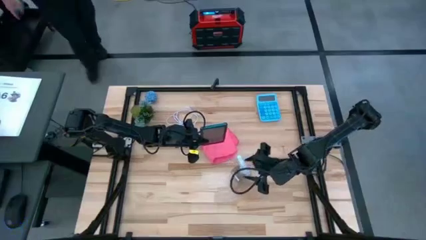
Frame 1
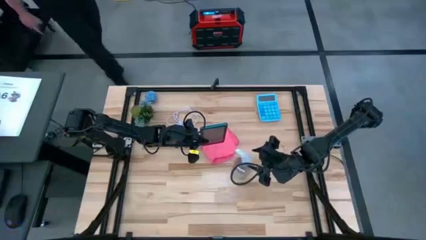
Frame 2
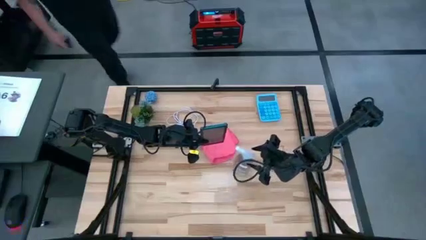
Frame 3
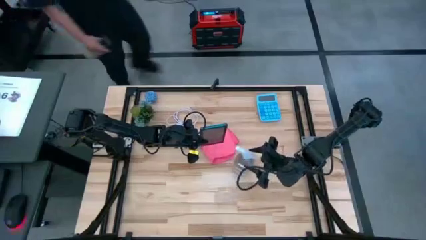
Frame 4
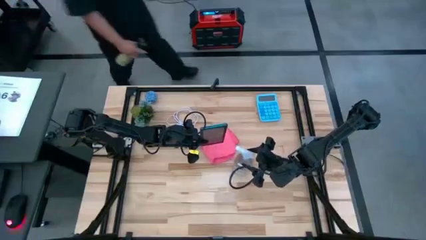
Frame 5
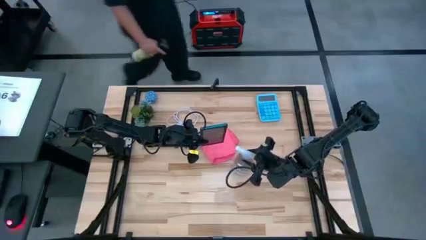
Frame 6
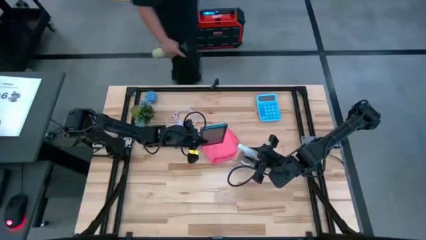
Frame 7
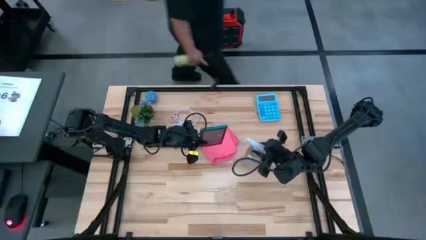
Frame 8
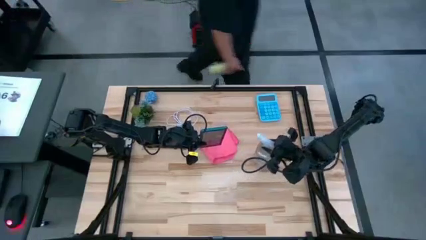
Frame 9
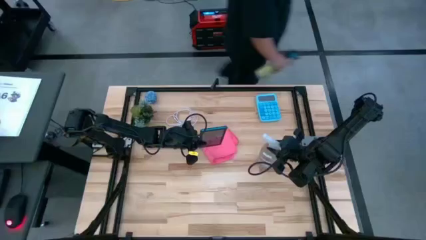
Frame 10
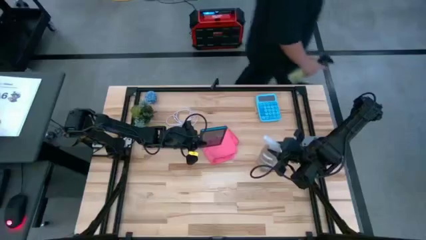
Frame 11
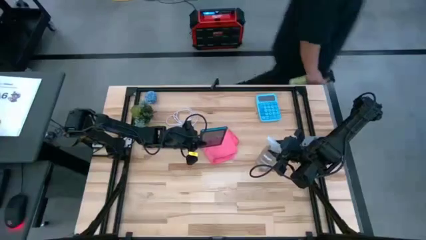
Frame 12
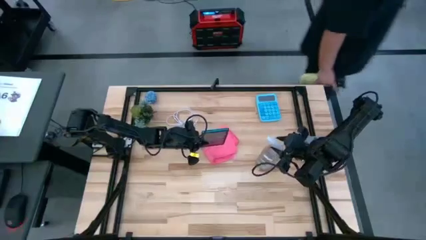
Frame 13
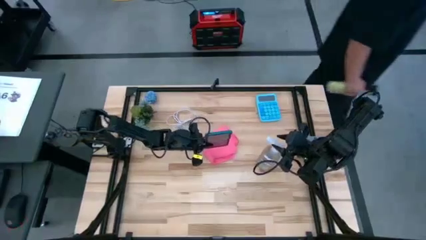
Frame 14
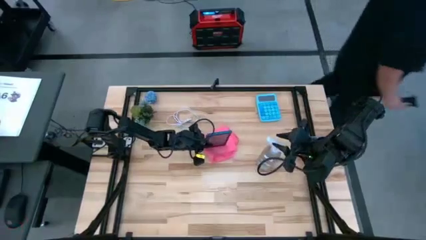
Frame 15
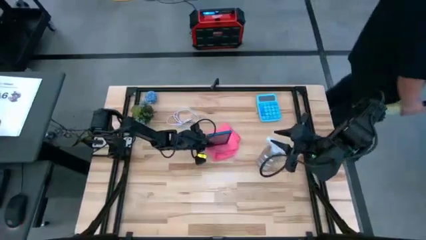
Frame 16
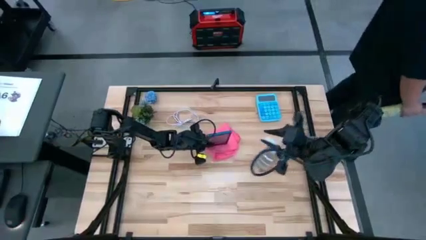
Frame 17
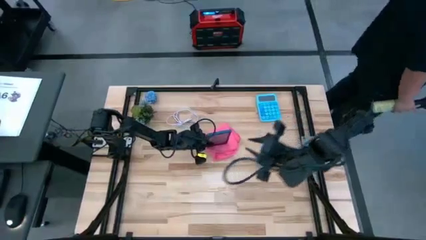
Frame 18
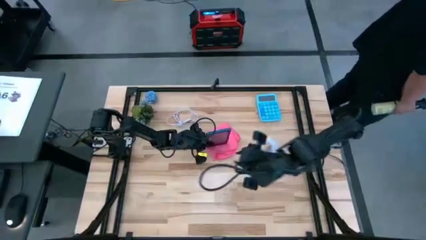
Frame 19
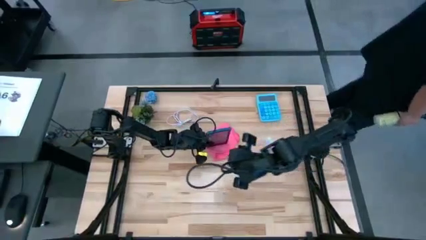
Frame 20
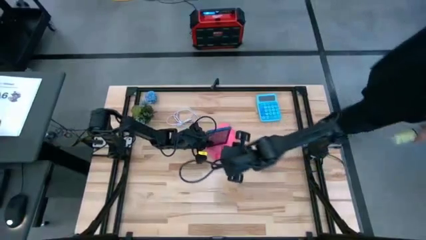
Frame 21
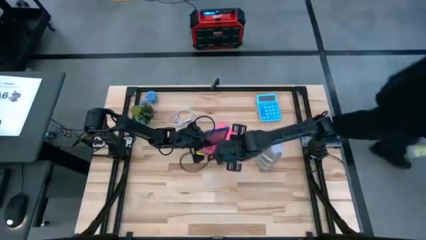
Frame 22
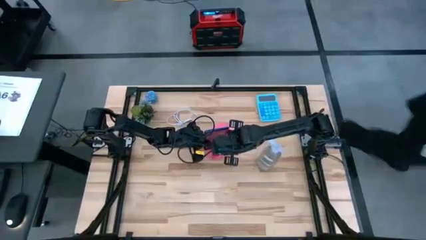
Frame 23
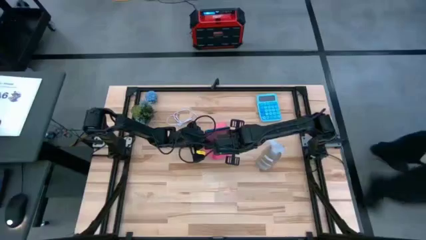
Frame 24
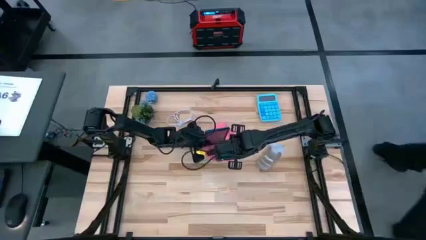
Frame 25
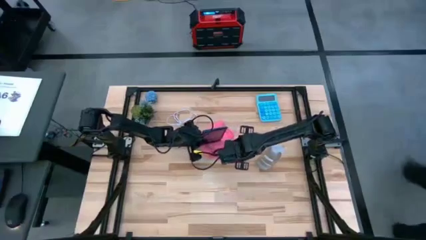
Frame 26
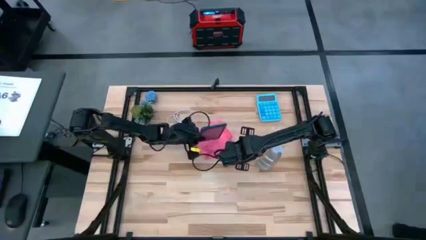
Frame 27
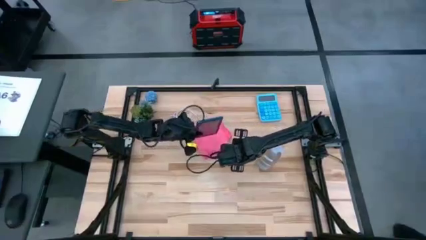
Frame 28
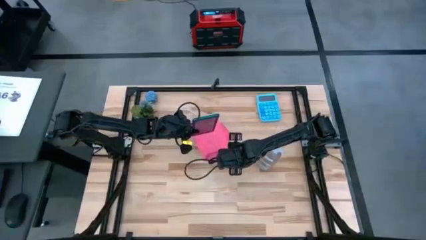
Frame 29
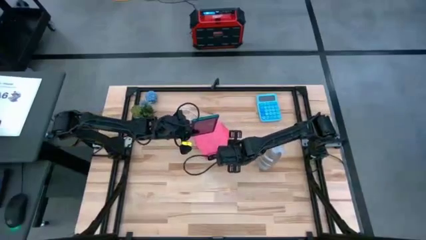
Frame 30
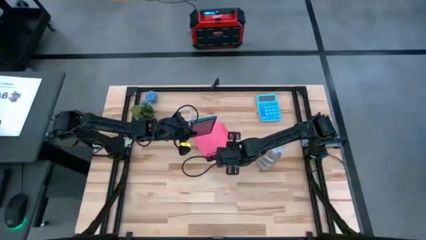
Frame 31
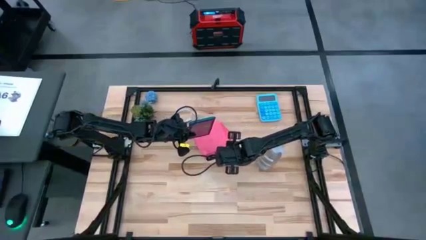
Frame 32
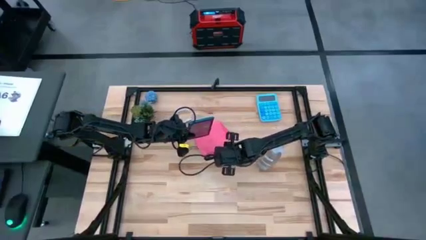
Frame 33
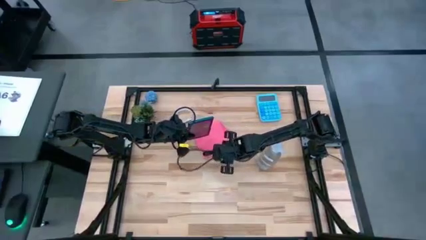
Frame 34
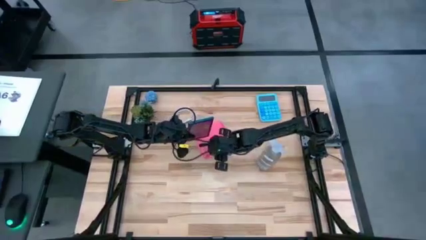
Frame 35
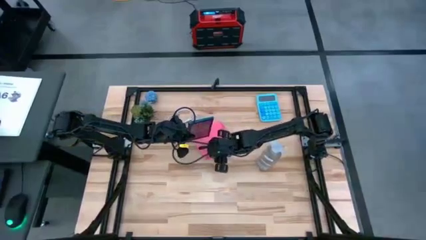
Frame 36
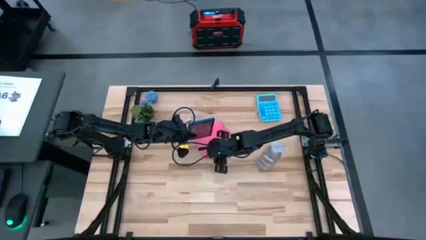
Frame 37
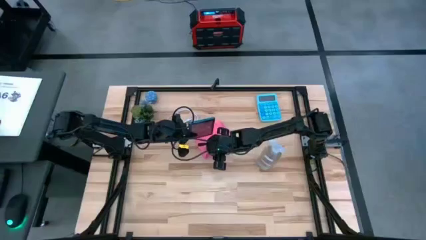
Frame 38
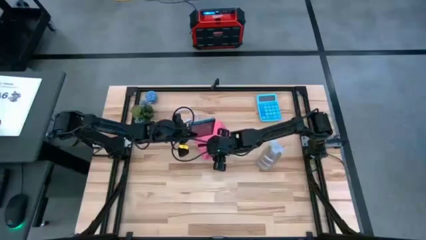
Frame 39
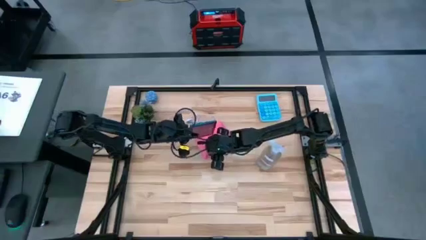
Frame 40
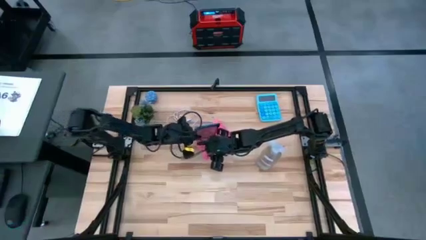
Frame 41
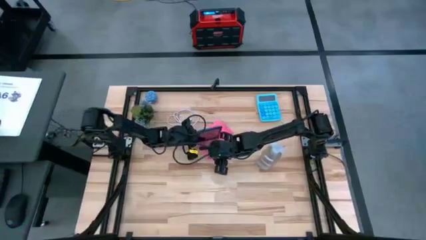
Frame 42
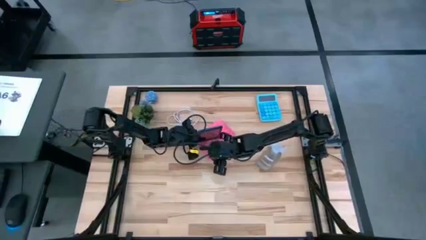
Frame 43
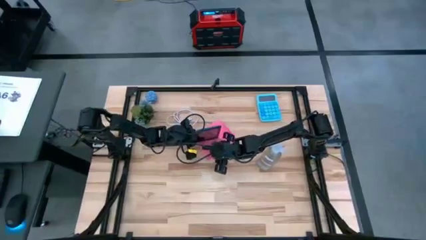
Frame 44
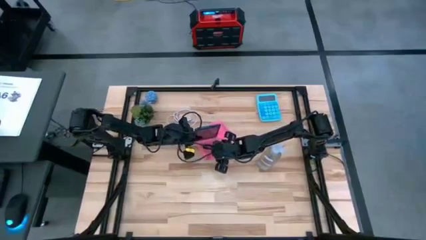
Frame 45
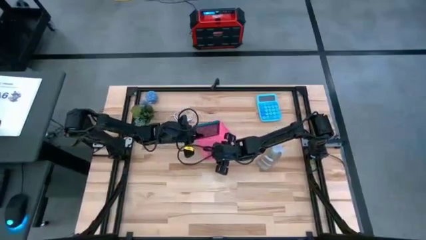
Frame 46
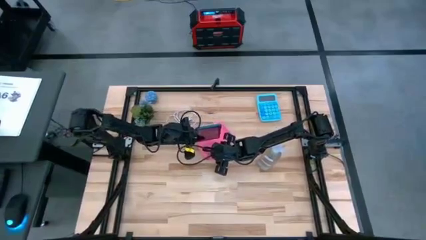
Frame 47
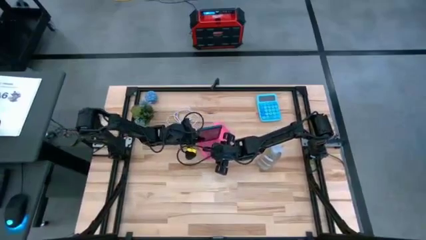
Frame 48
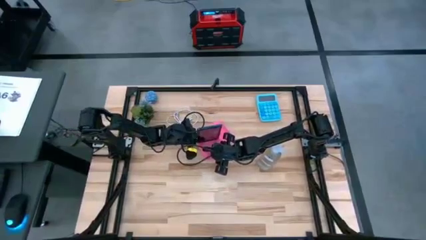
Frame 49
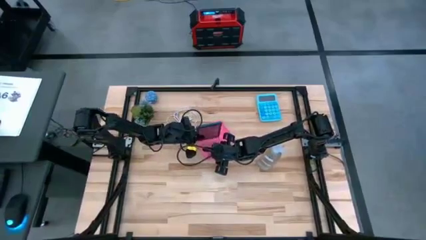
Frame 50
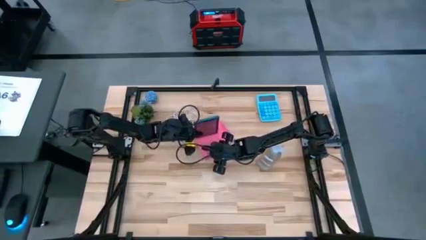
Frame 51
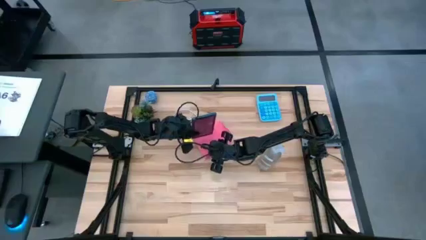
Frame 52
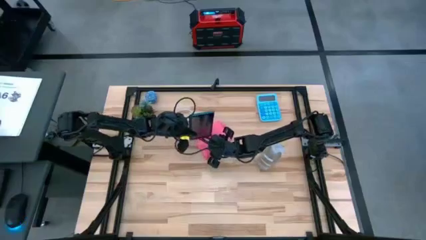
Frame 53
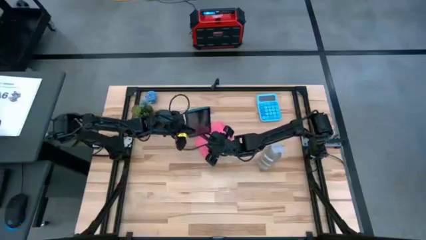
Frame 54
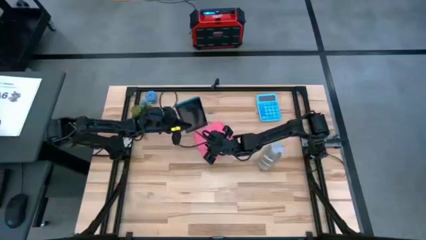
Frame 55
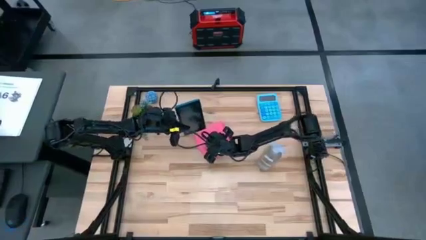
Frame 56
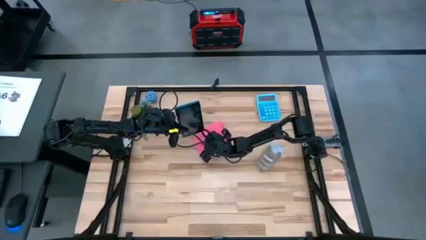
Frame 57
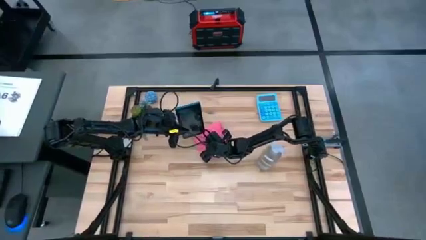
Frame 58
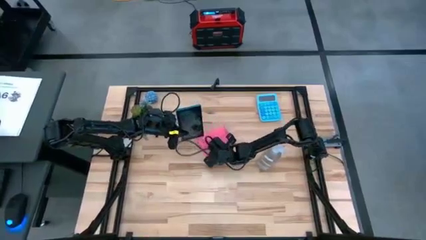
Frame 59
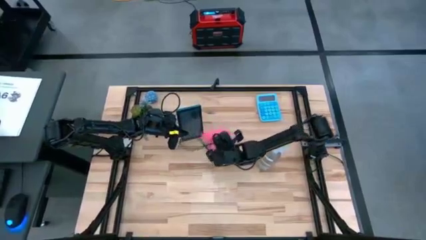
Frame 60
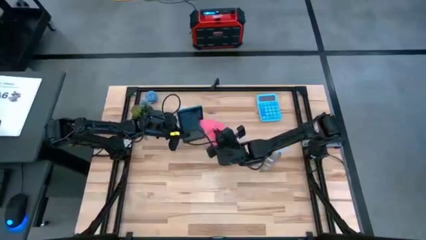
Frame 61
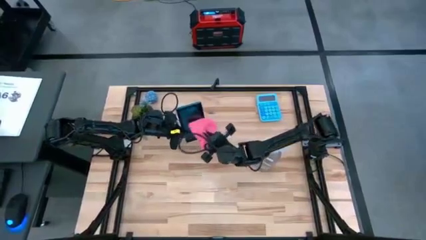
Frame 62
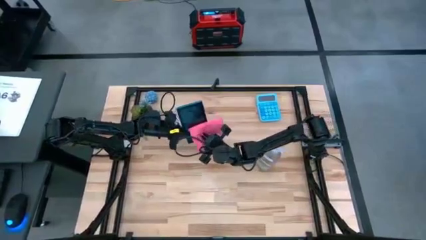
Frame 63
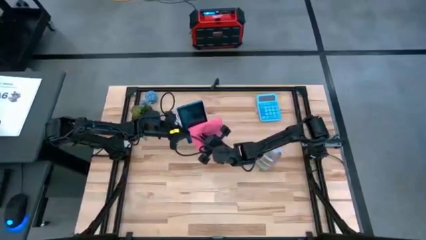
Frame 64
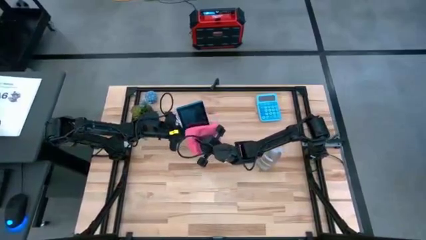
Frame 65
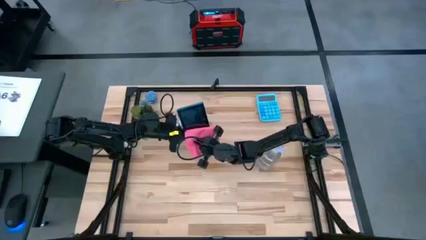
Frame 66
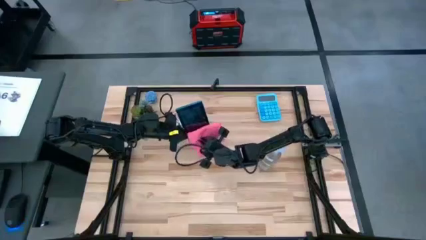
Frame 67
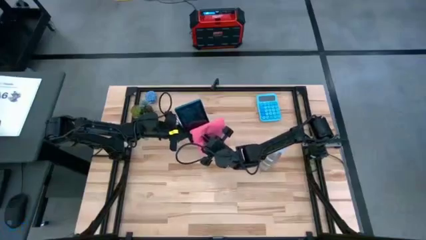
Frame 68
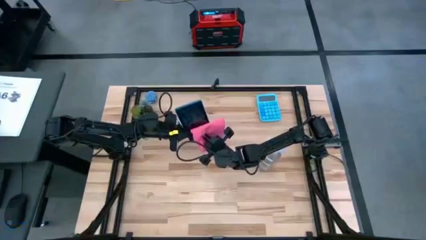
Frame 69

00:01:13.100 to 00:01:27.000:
Task: Apply microfiber cloth
Wipe the front of the cellphone with the pink microfiber cloth
